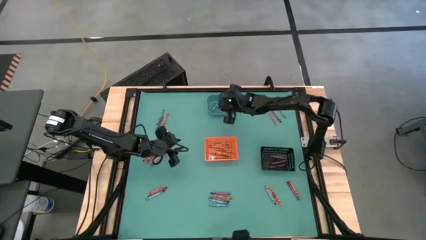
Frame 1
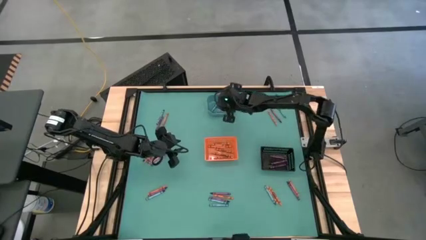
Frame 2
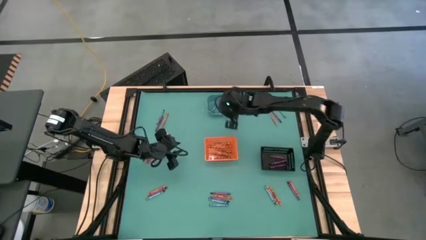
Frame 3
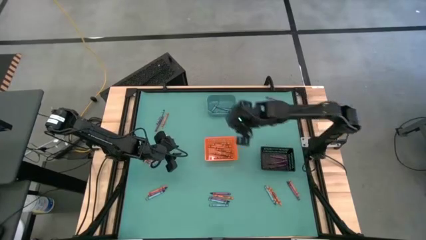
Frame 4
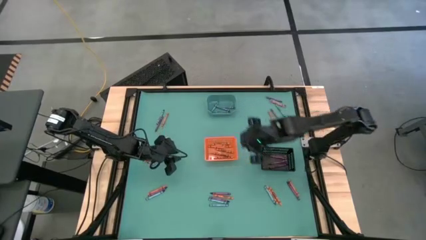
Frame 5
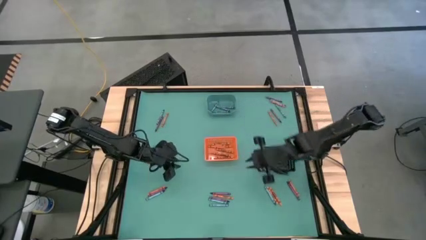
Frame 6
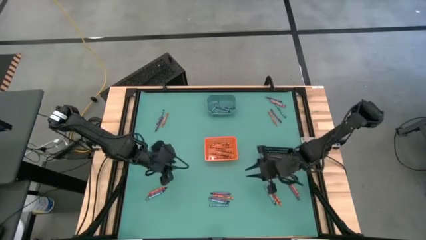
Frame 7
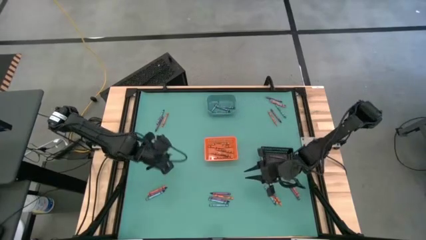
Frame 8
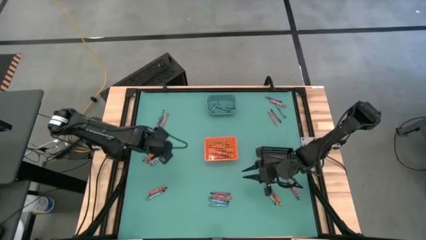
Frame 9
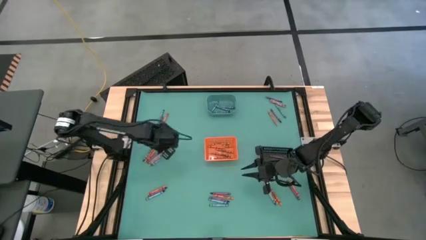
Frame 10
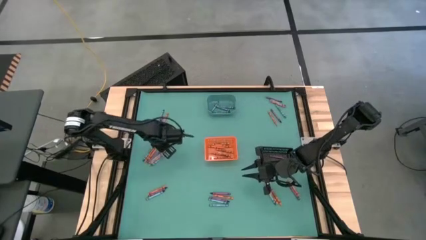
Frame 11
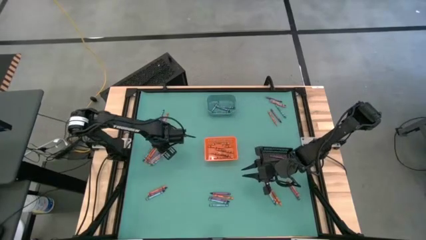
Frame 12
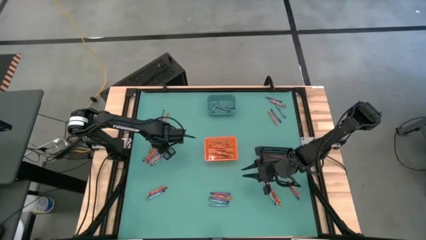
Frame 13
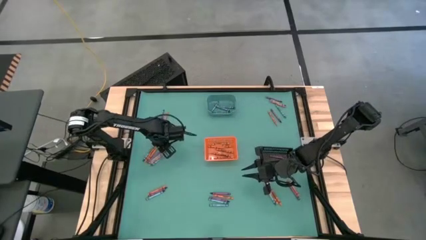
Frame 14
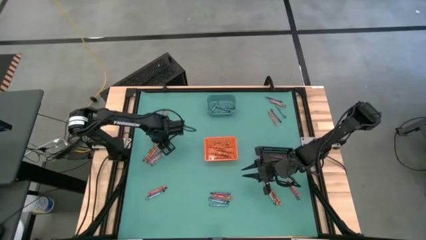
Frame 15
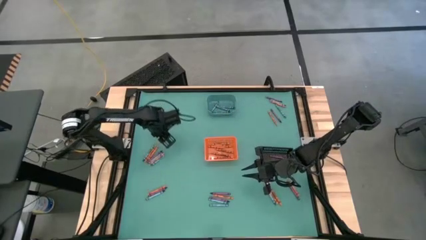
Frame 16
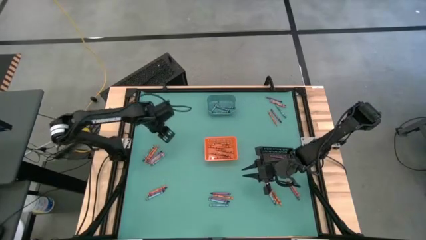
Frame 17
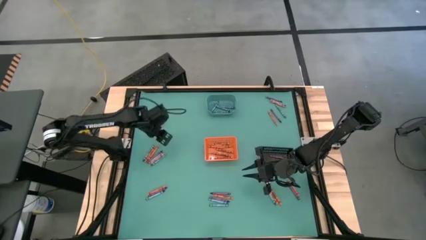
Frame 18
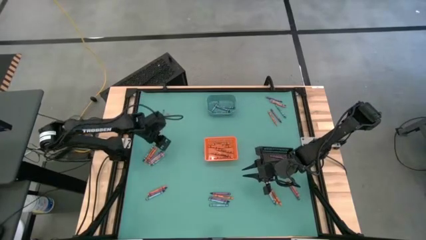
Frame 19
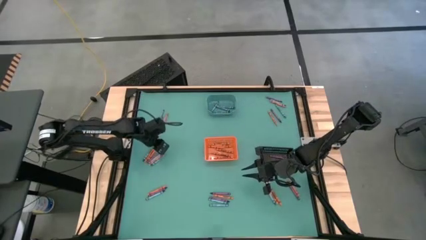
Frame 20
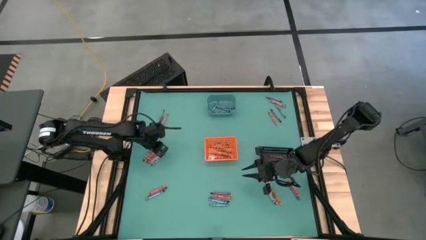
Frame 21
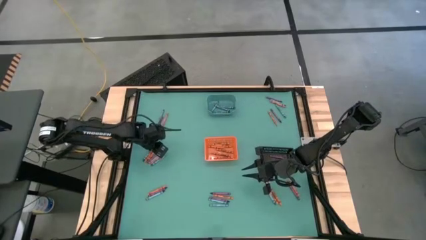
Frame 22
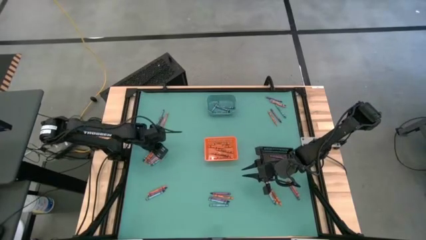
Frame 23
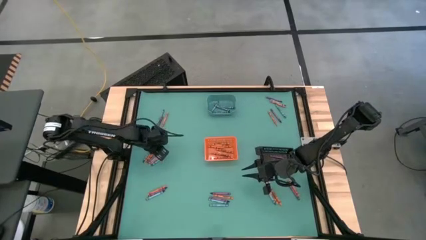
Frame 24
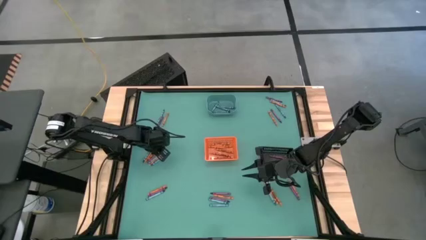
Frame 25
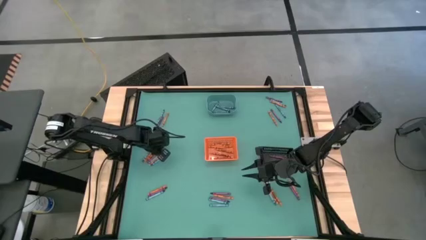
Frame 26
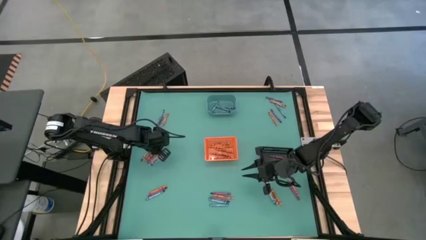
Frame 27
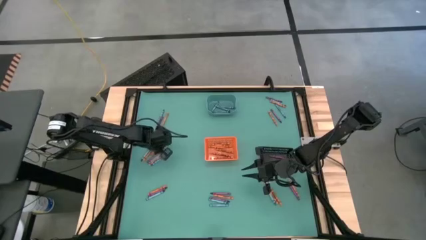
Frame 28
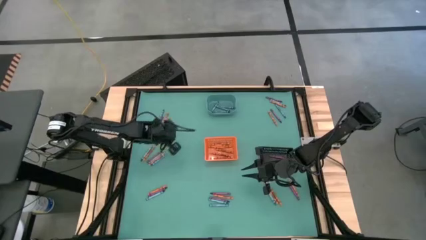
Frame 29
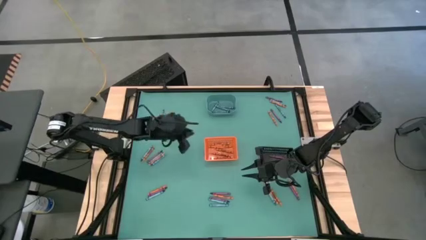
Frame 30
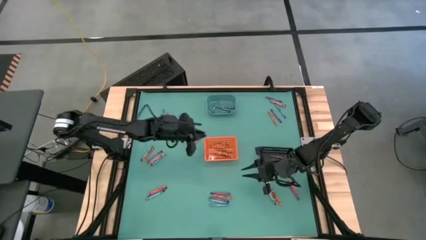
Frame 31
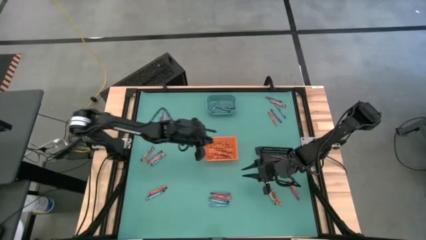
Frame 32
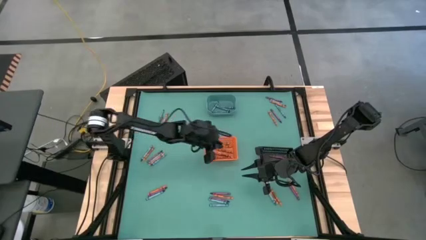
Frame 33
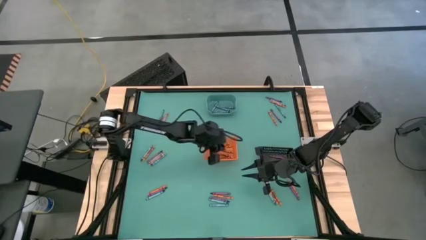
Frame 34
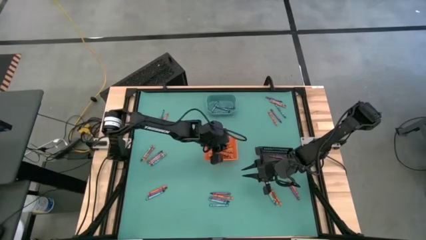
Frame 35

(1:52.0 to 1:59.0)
Task: Sort crayons
Put the orange crayon into the orange bin

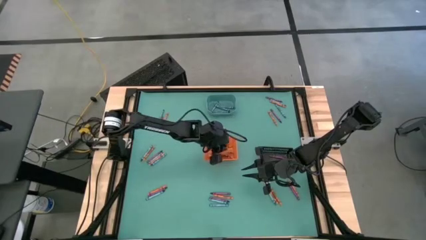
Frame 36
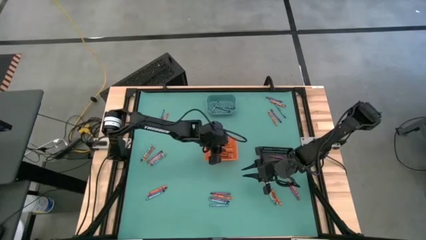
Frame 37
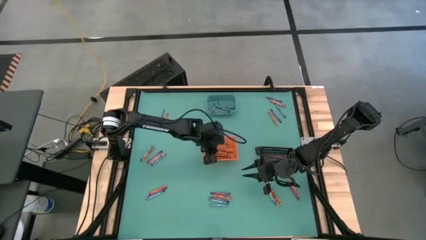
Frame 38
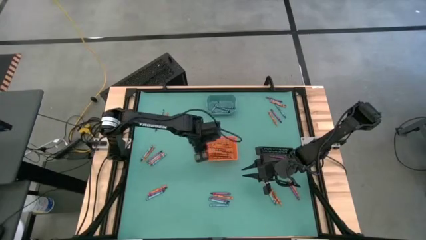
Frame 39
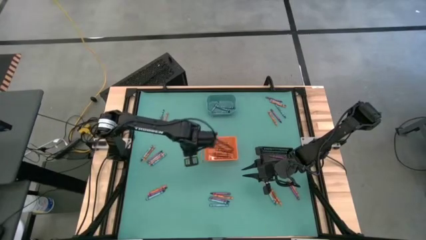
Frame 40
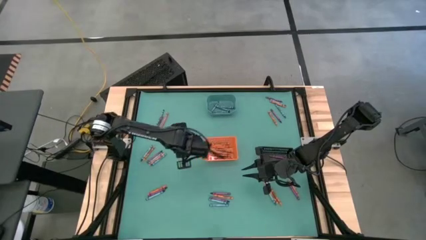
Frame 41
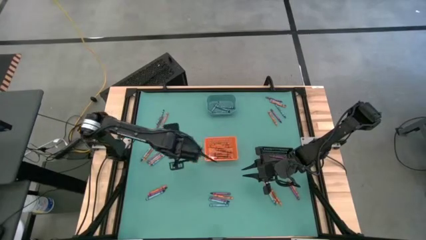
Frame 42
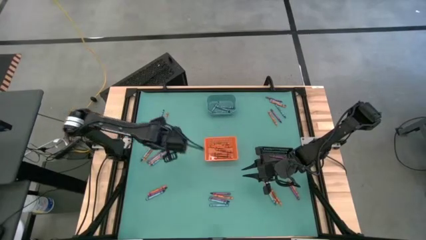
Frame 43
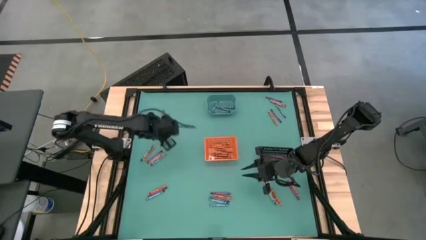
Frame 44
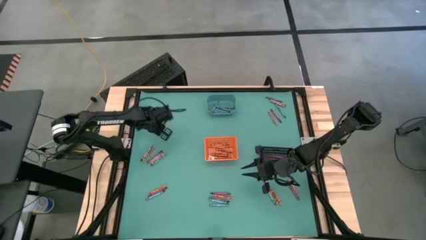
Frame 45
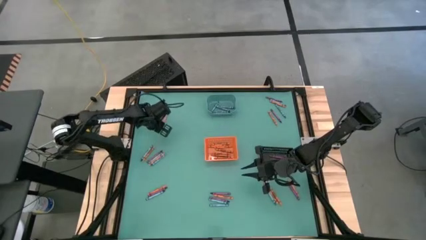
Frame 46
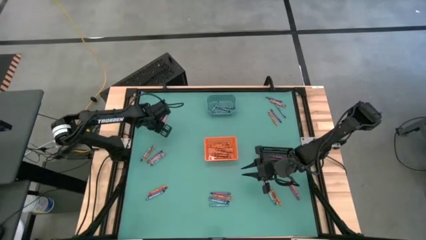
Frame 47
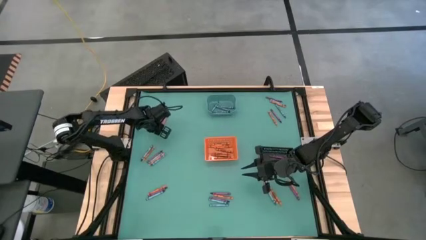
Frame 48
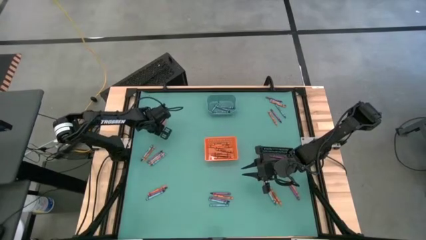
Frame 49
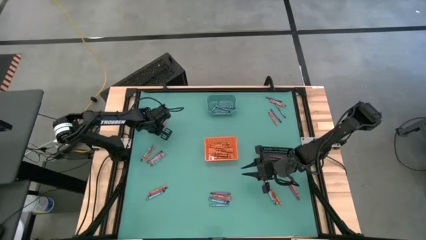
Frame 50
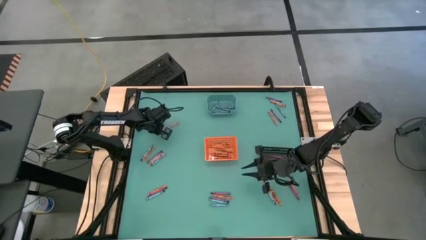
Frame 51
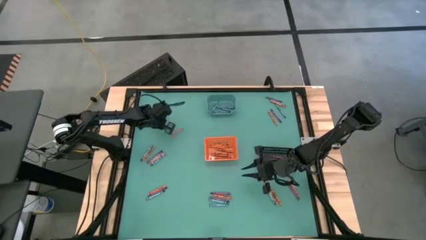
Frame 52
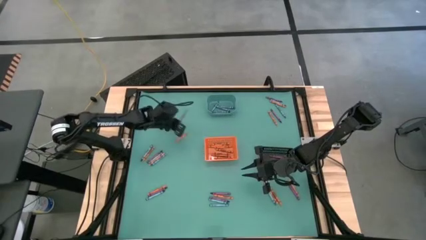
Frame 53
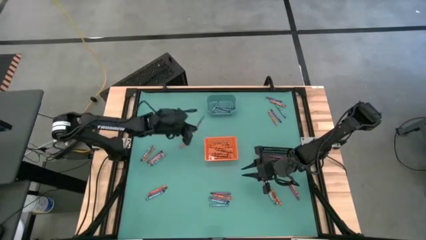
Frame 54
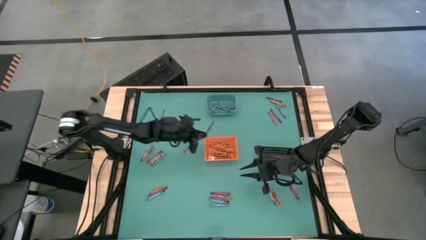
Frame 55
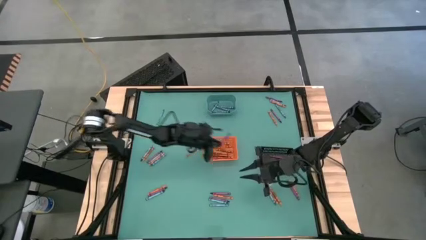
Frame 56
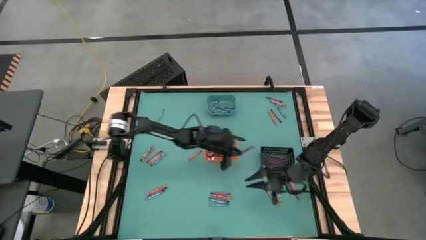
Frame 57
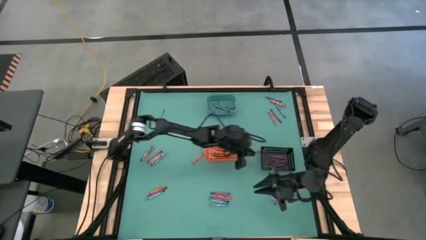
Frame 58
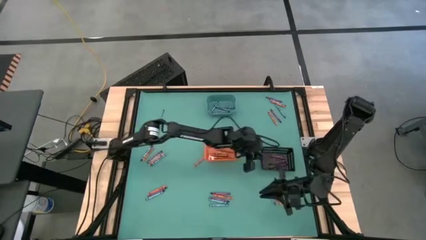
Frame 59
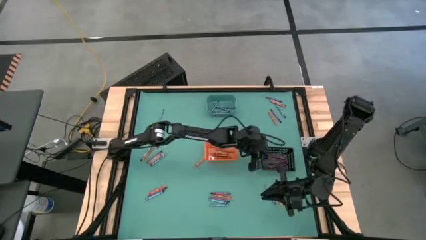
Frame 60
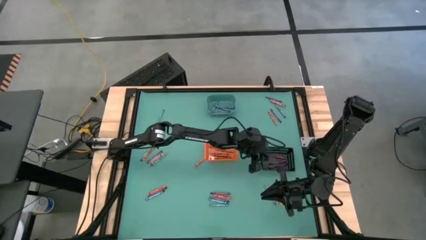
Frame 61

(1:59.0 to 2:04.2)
Put the violet crayon into the black bin

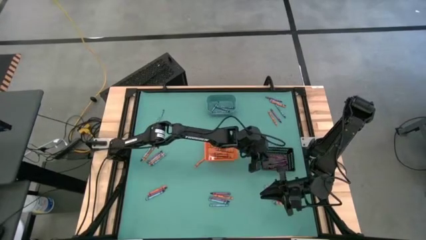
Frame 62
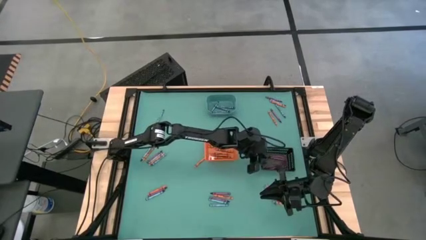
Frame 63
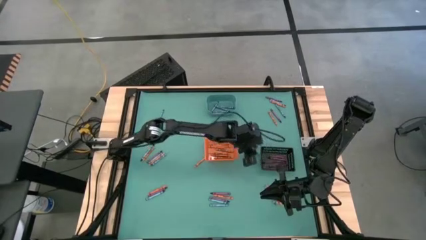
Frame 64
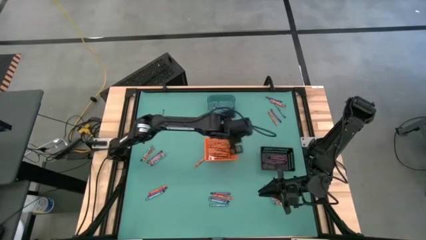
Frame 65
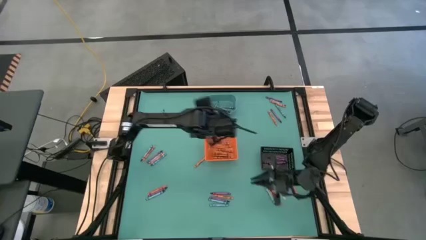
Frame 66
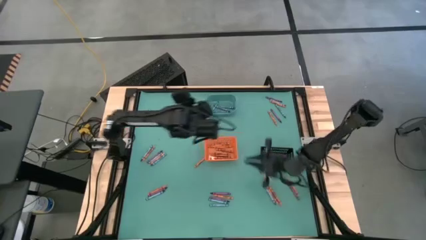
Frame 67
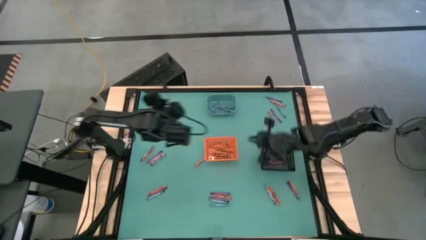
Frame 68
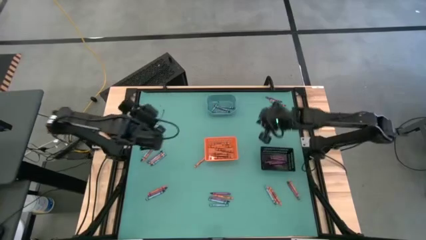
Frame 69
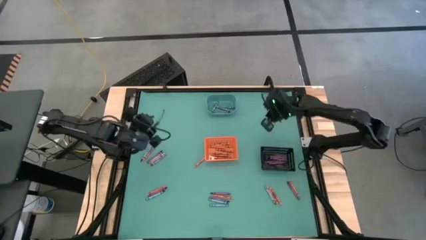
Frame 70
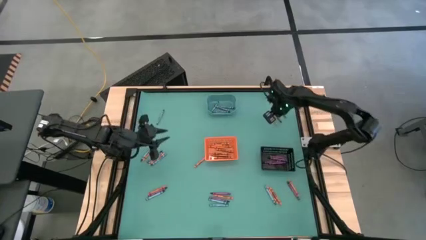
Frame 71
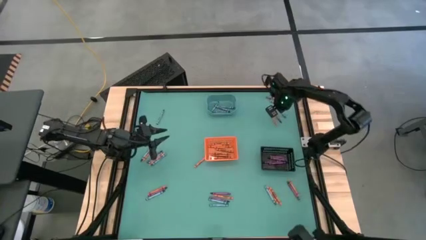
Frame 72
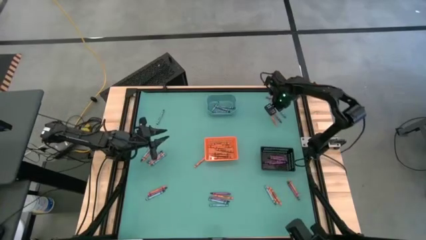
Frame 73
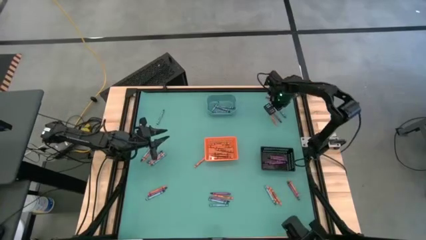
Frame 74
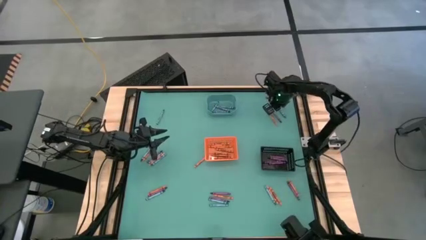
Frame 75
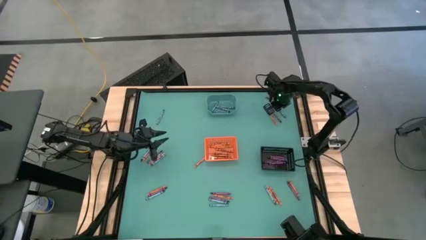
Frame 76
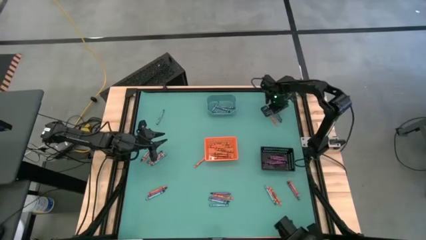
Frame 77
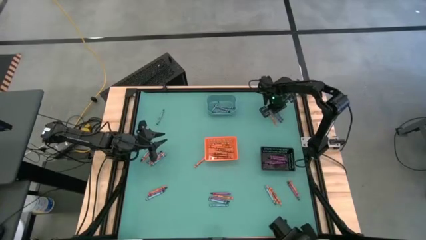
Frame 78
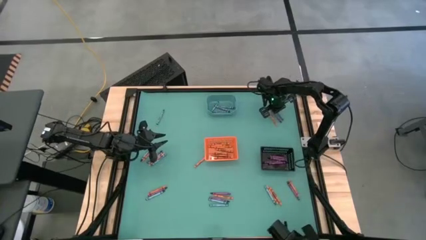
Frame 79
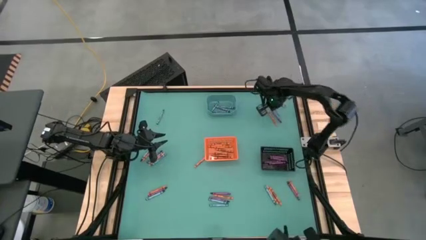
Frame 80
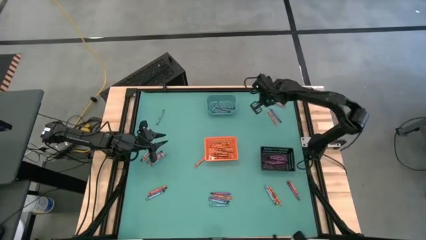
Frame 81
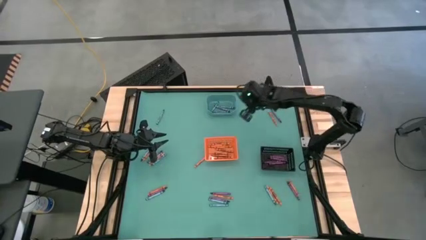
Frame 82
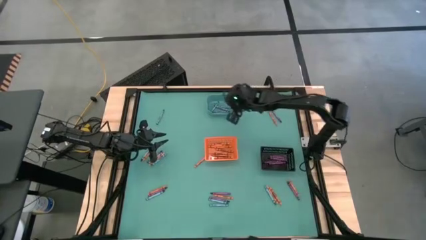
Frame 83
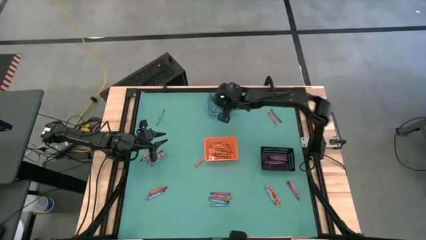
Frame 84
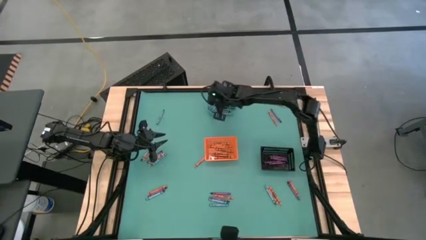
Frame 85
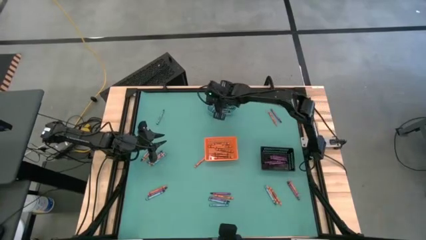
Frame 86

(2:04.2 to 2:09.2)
Put the green crayon into the blue bin
